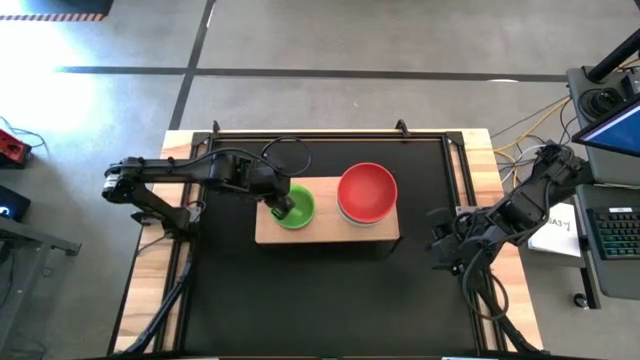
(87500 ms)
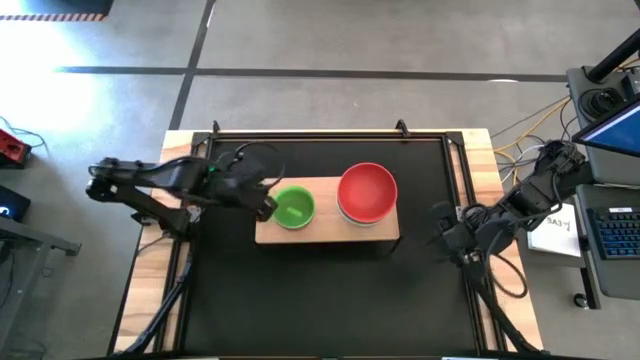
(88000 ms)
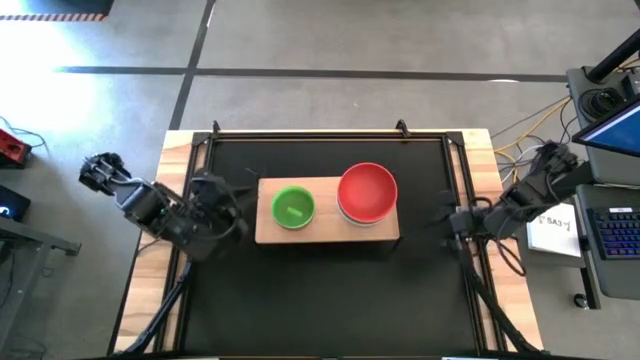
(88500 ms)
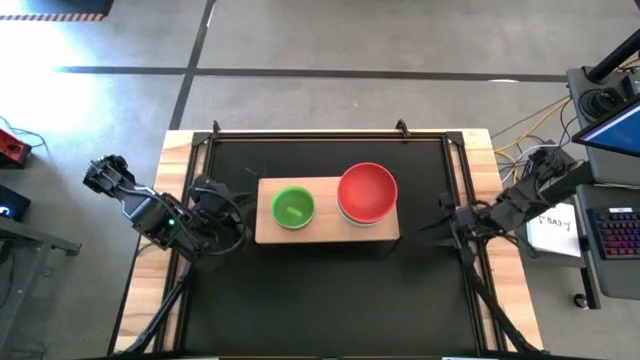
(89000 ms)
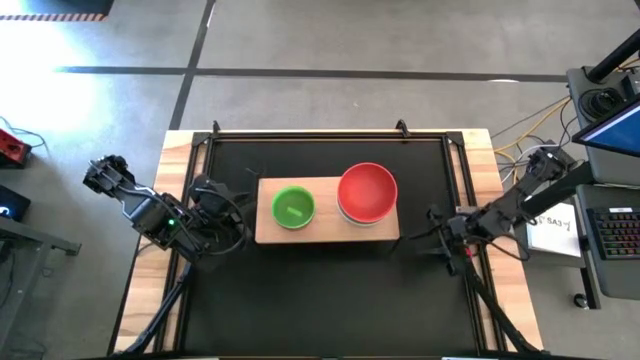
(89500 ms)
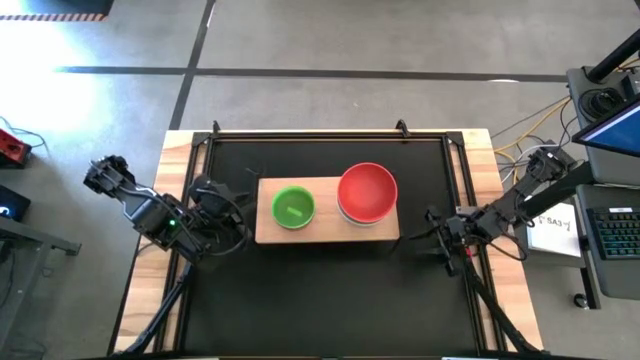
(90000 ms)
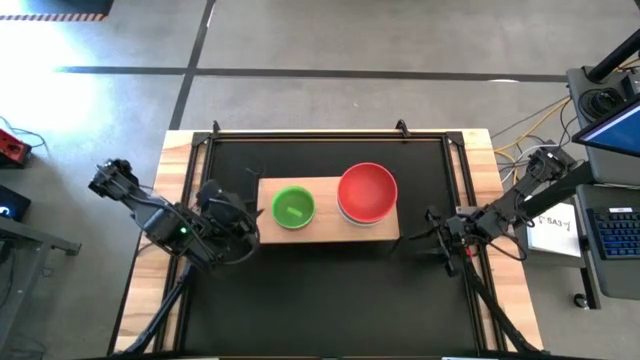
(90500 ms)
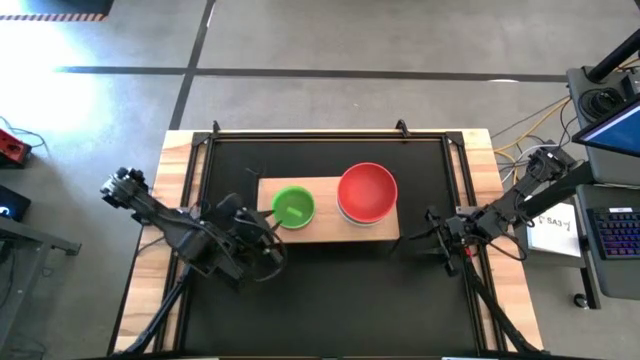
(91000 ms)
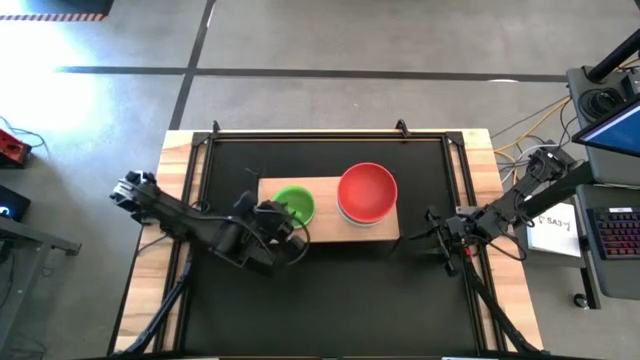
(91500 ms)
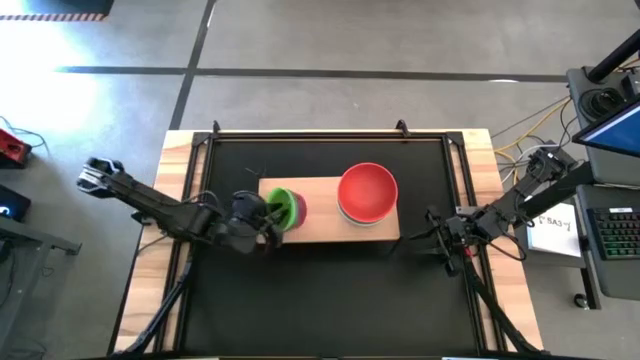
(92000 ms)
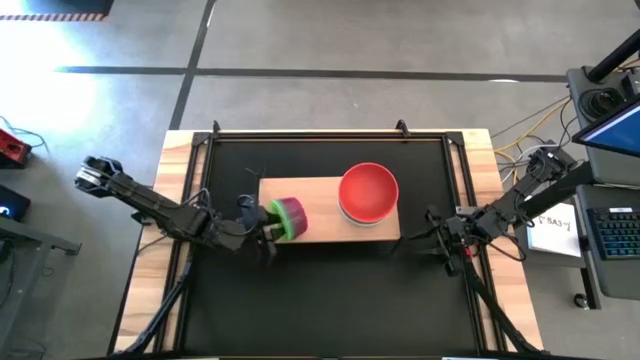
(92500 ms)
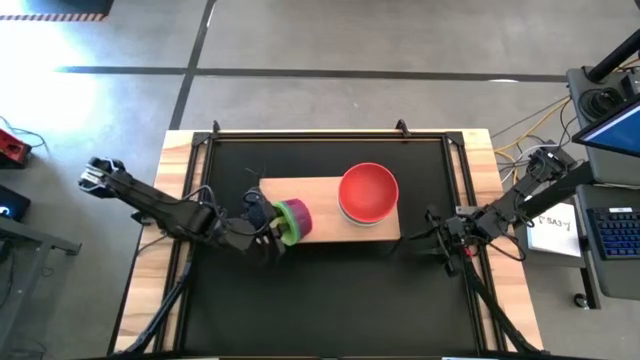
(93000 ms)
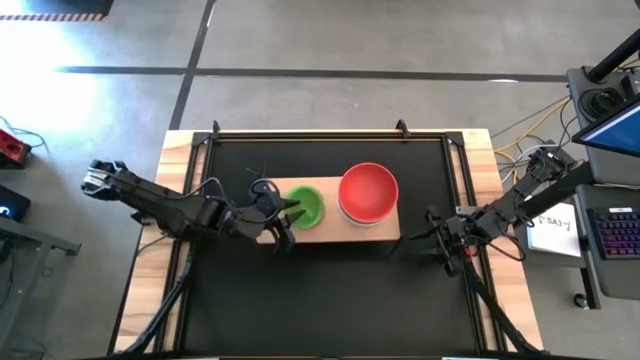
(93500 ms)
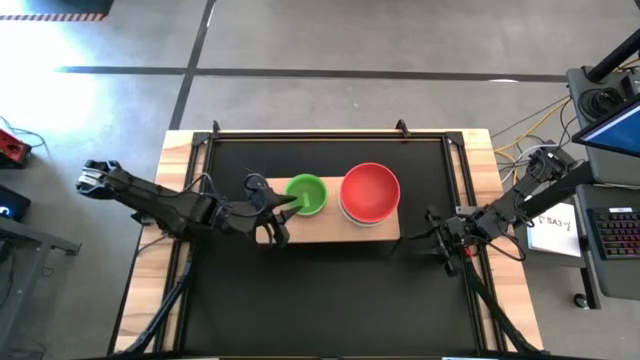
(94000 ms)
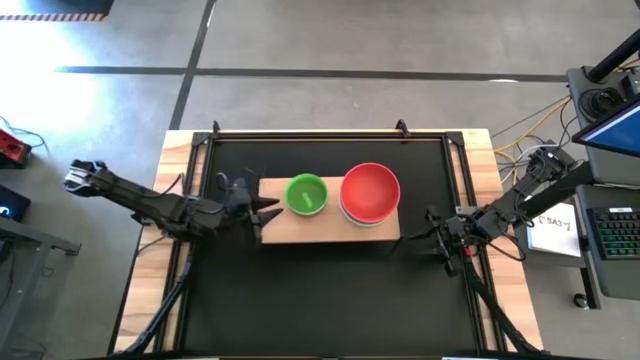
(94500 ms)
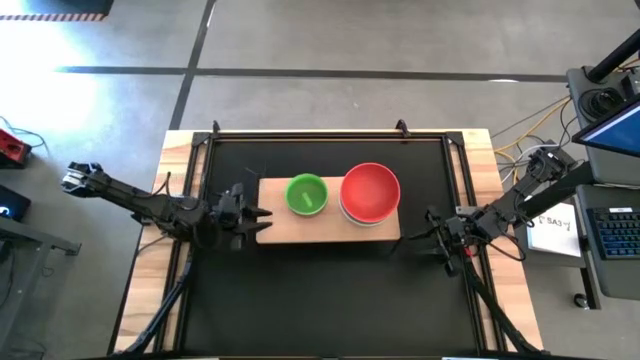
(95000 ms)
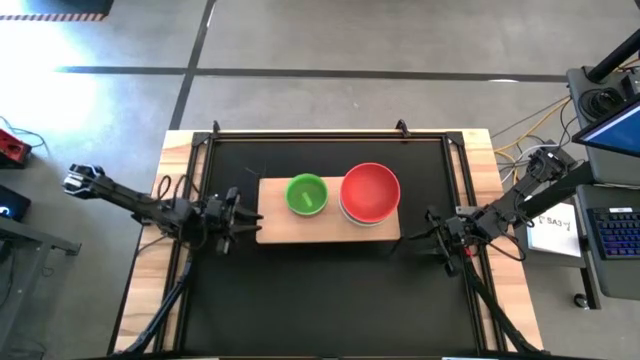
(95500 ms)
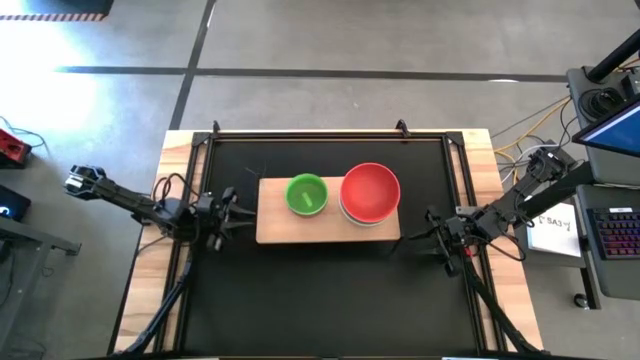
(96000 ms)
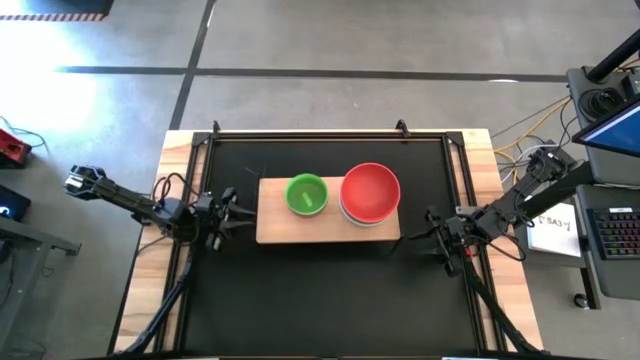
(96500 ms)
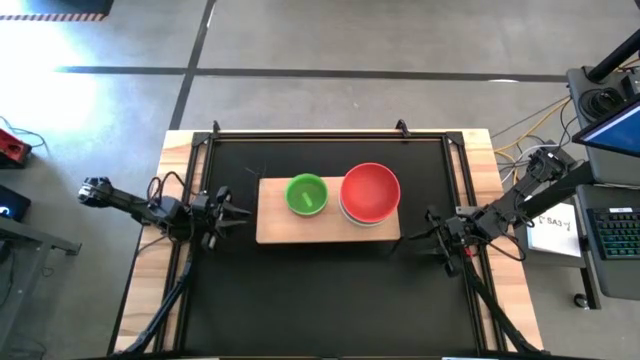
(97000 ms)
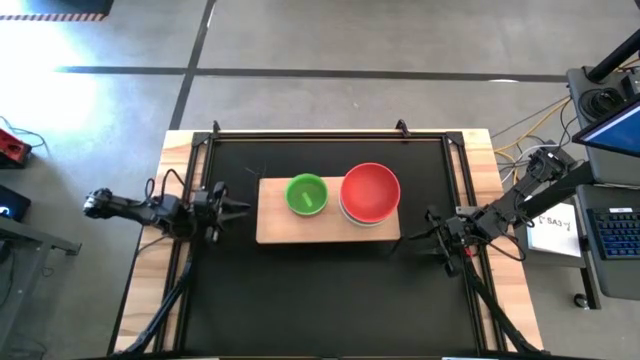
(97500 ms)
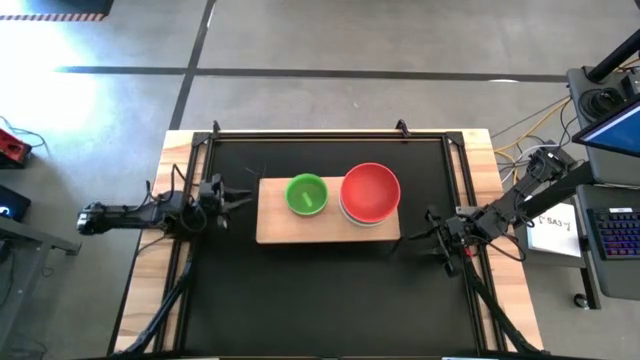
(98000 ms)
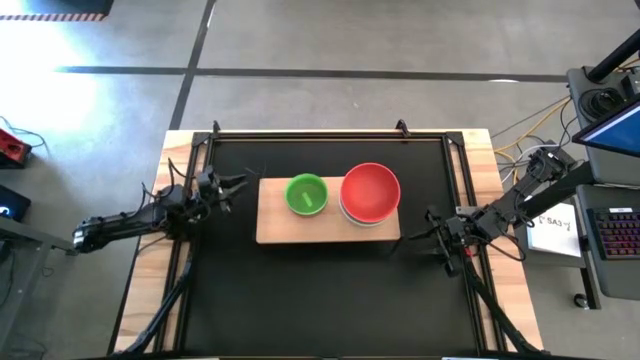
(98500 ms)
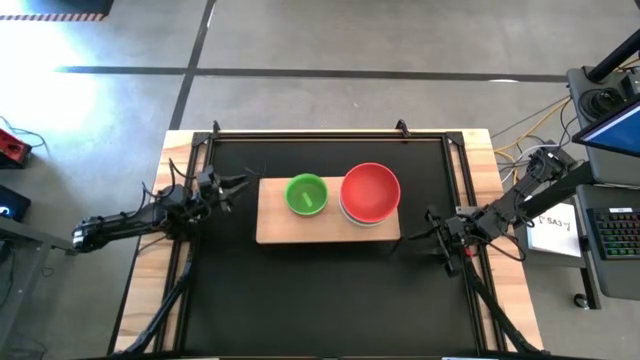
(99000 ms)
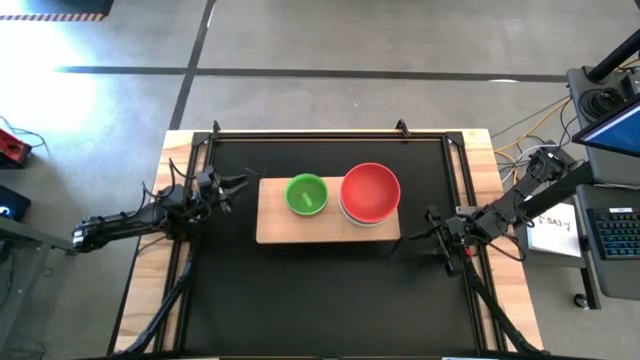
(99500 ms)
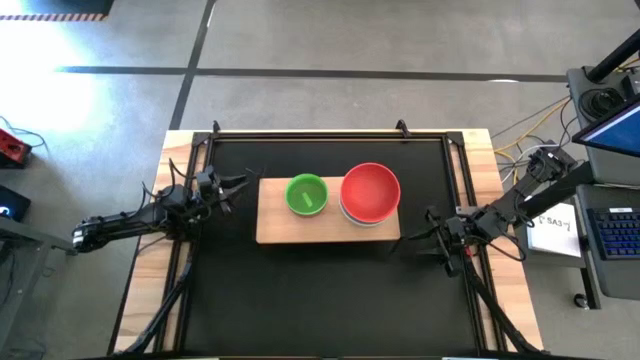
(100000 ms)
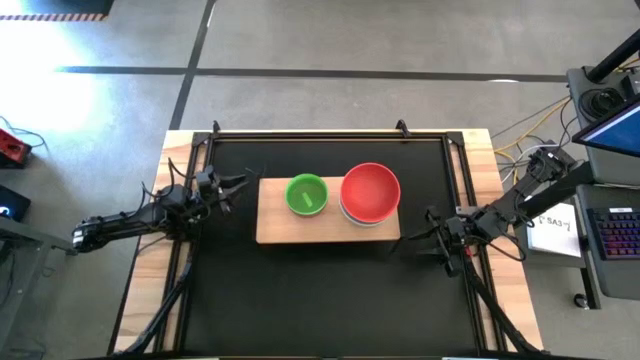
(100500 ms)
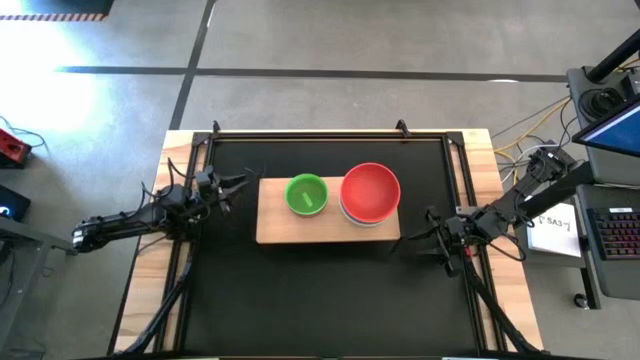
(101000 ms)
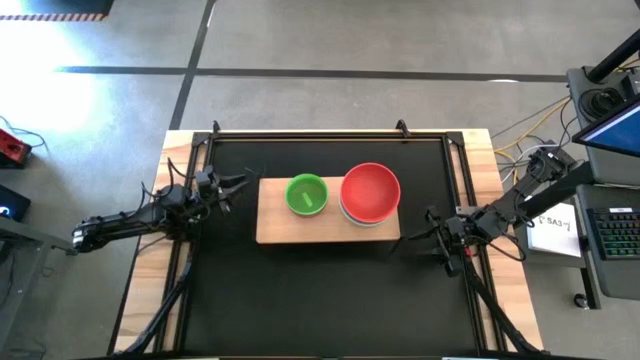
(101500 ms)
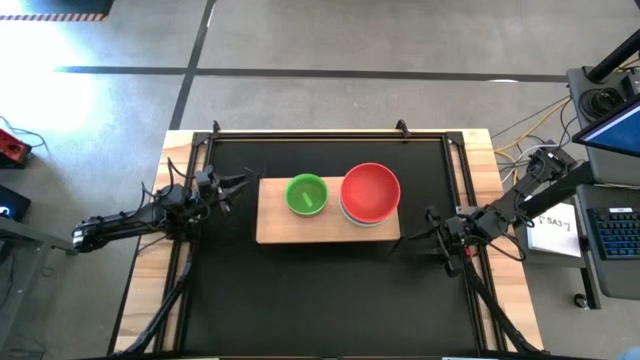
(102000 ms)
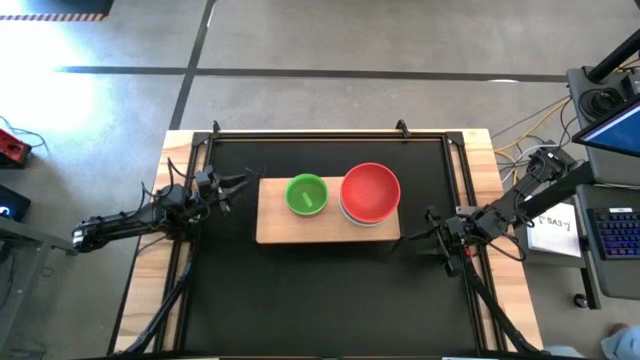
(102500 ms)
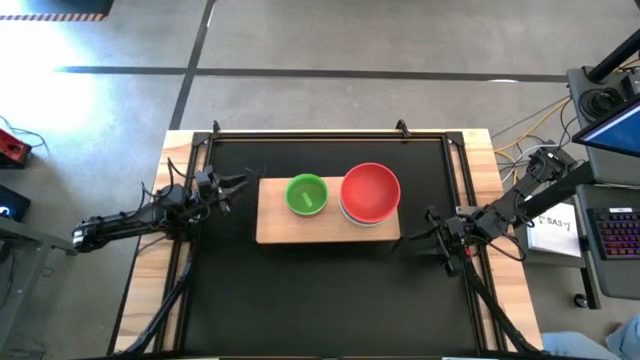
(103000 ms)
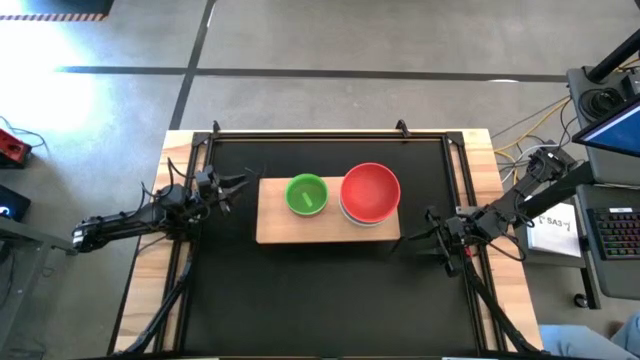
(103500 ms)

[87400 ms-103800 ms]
Task: Place and stack bowls onto a shelf
Return to Home Position

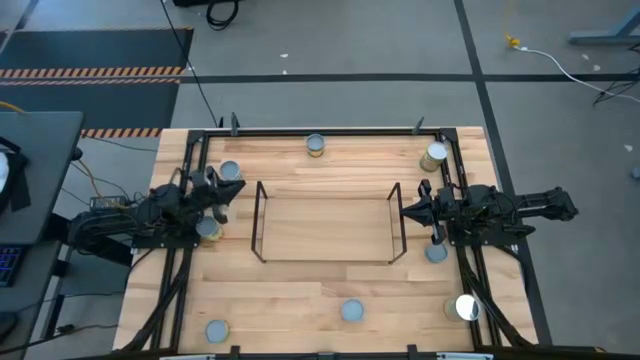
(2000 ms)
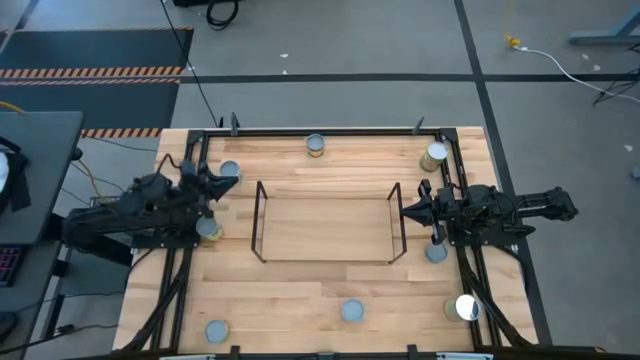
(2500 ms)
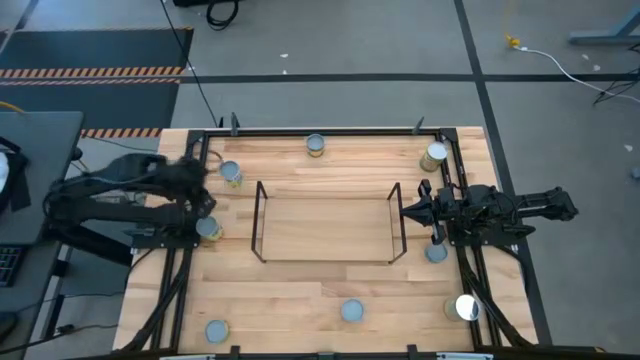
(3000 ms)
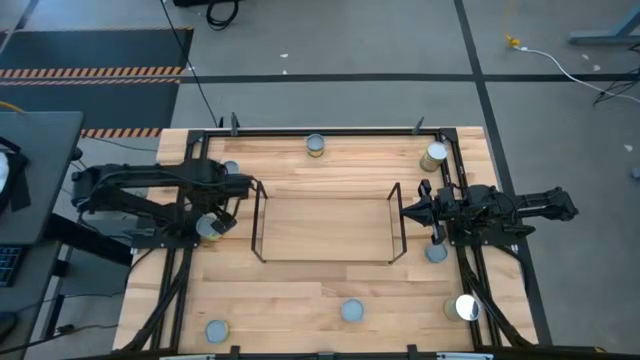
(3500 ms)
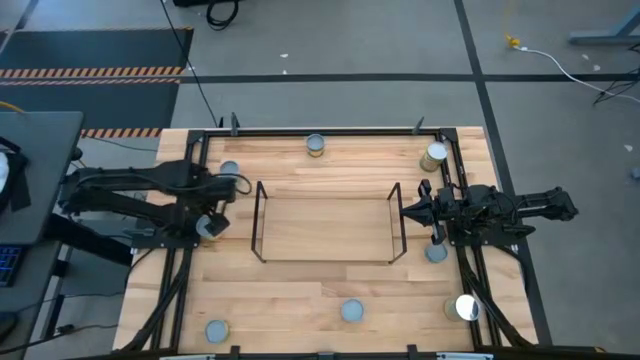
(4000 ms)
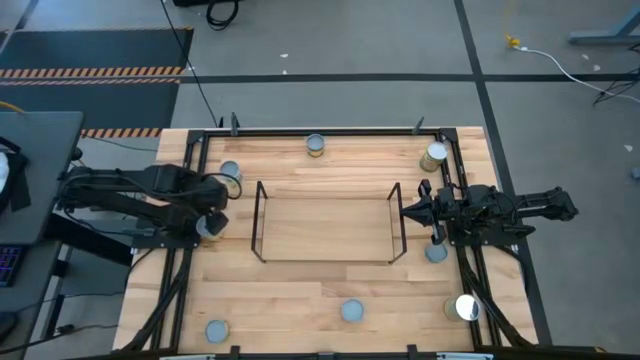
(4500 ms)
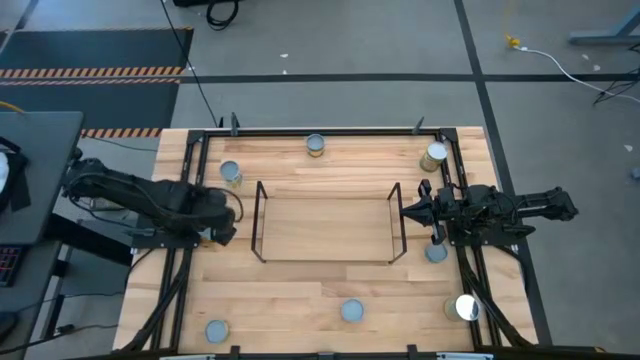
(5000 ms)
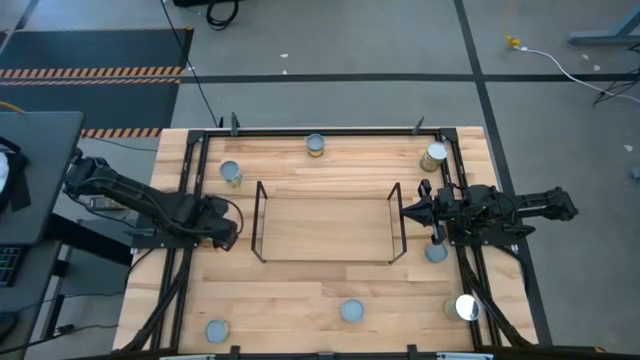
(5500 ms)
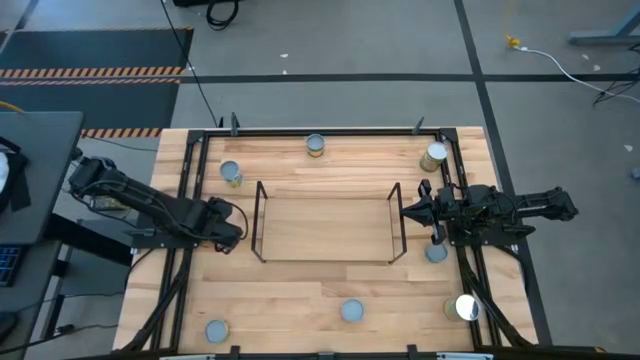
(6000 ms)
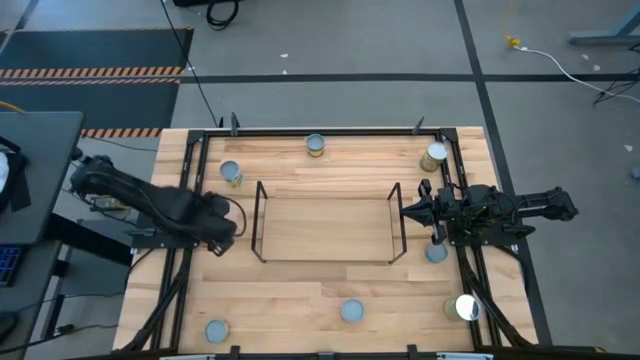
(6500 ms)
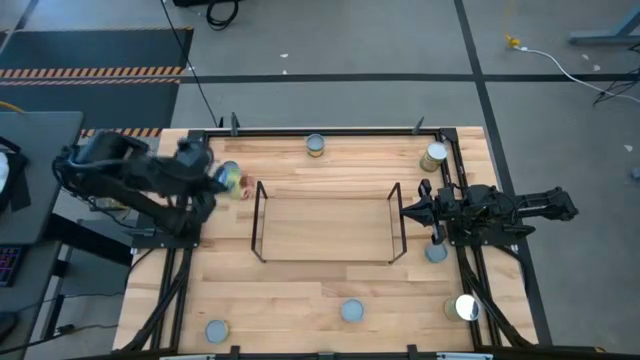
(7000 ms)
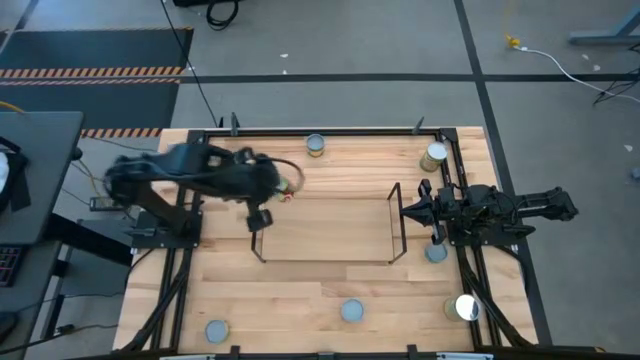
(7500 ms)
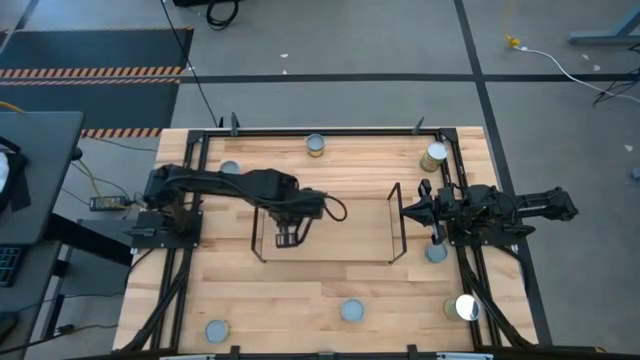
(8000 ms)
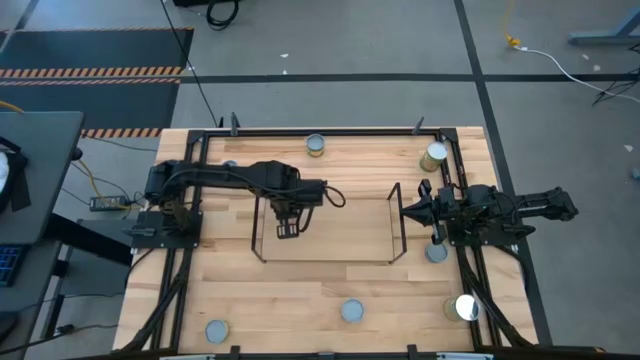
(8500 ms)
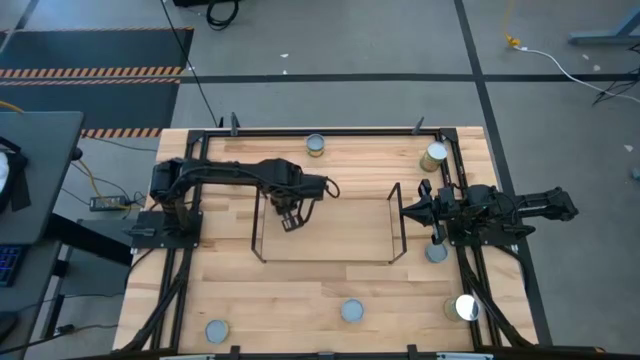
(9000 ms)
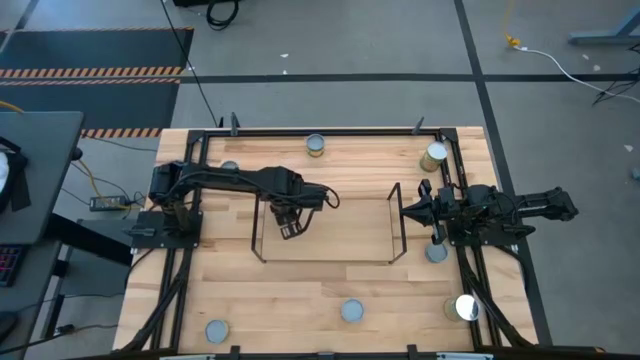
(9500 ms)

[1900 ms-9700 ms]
Task: Pick and place cans onto a shelf
Put the left green can on the shelf
